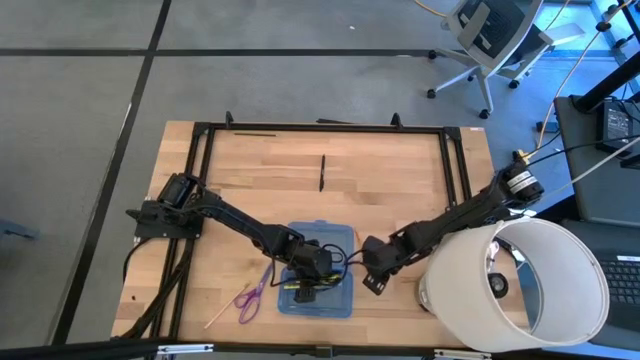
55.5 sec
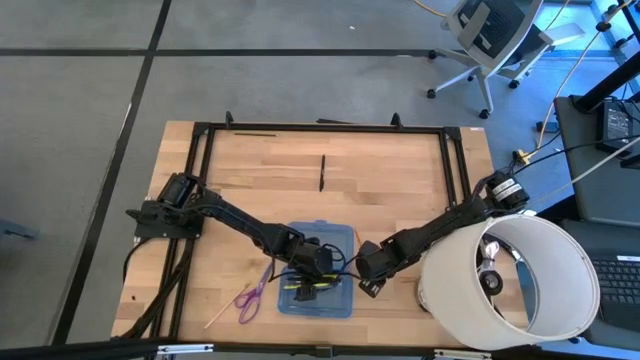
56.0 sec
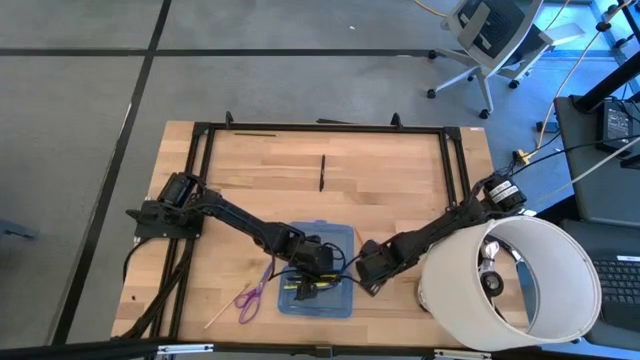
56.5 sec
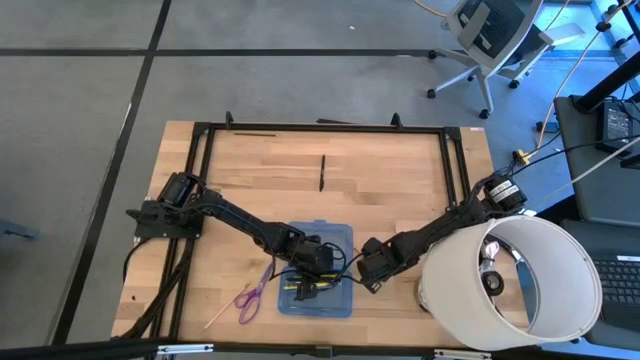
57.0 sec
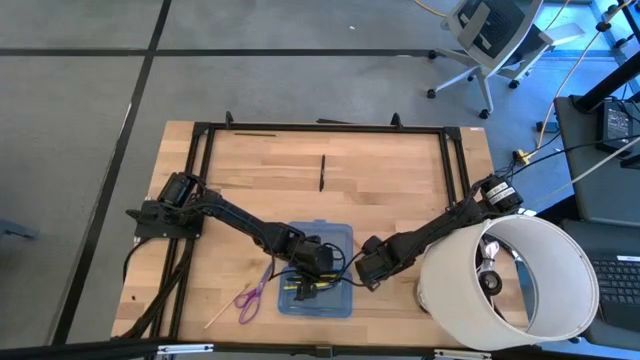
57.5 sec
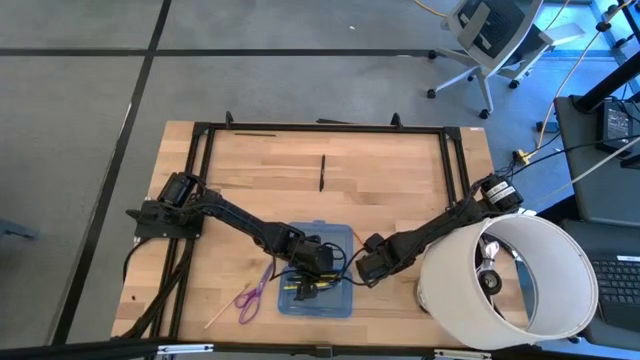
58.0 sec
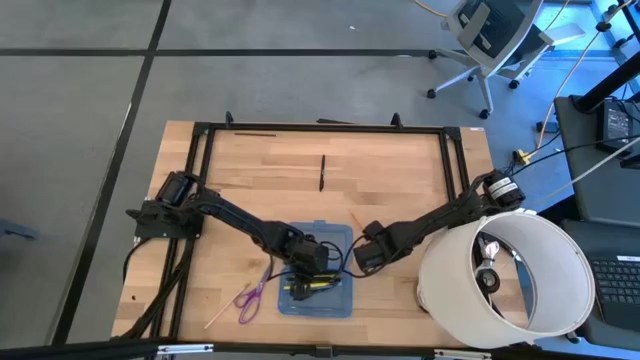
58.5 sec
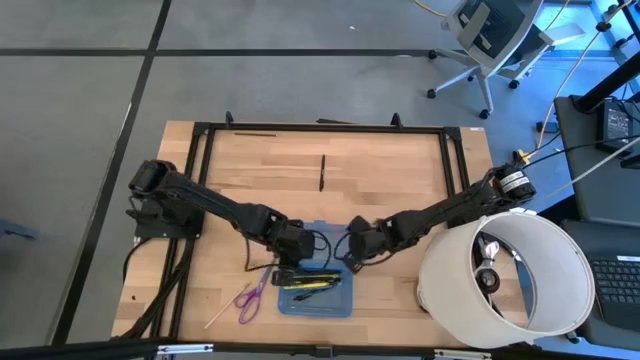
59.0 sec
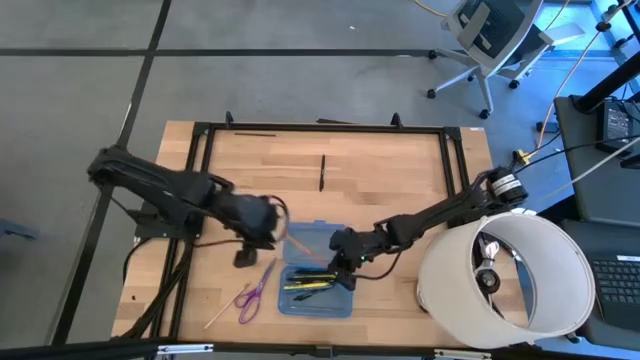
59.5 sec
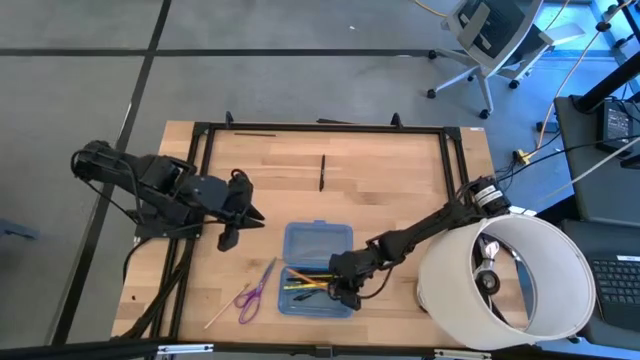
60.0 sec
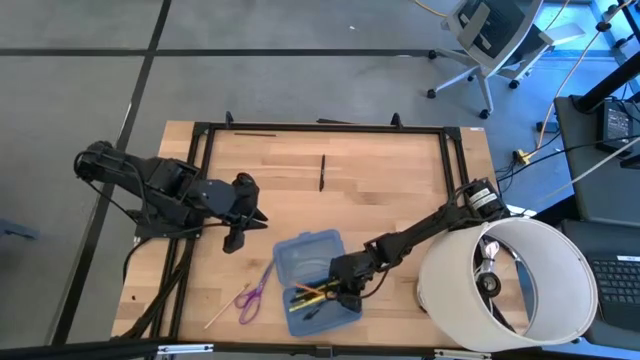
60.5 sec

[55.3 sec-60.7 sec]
Task: Pick & place school supplies into a supply box
Put the orange pencil into the blue supply box

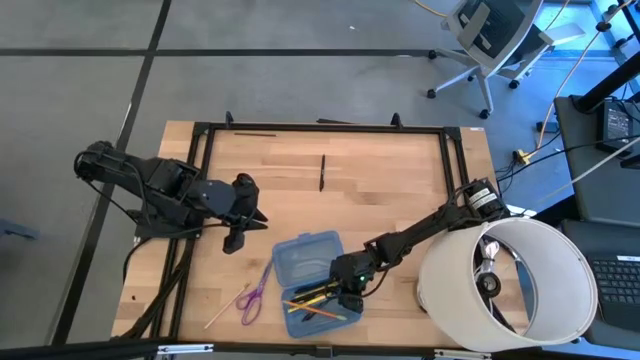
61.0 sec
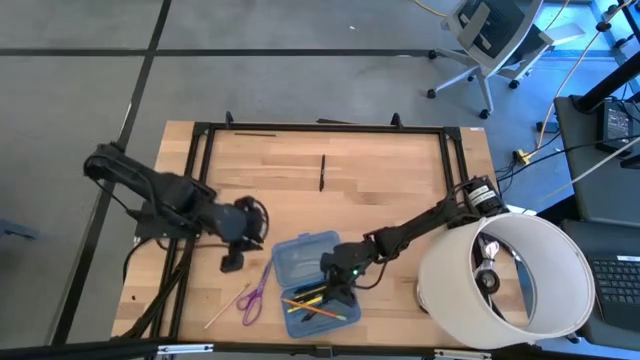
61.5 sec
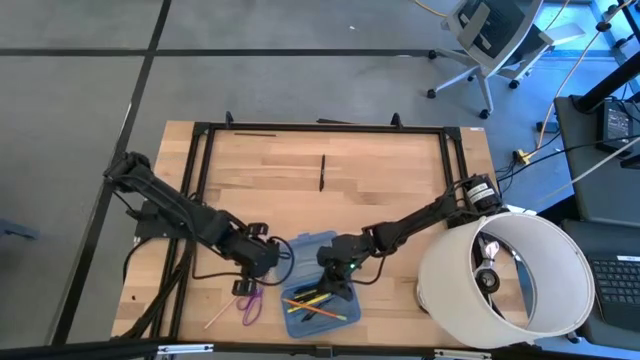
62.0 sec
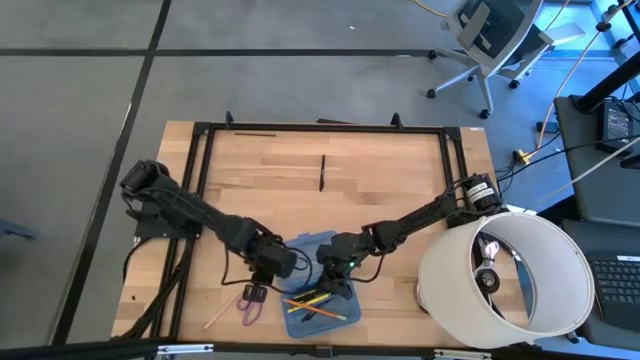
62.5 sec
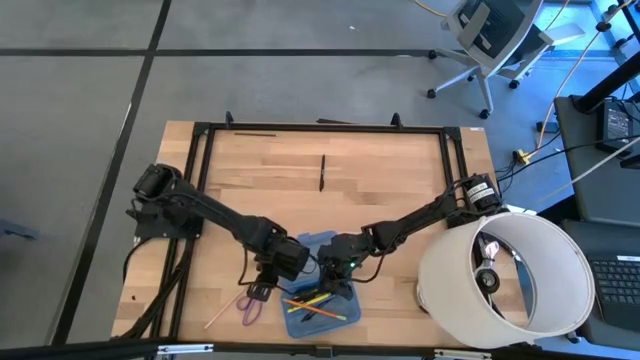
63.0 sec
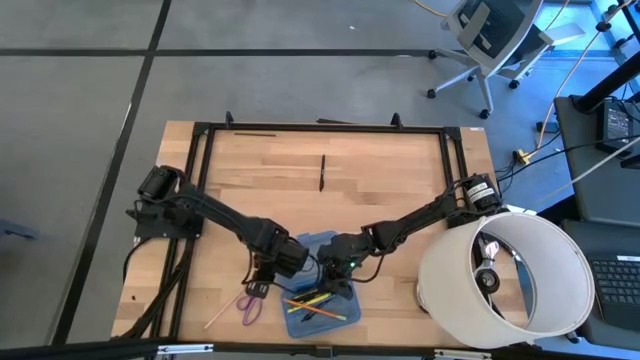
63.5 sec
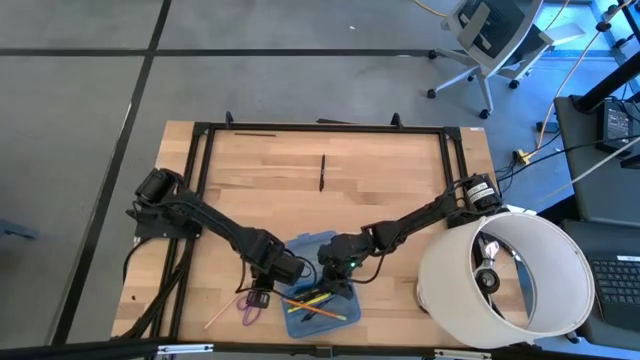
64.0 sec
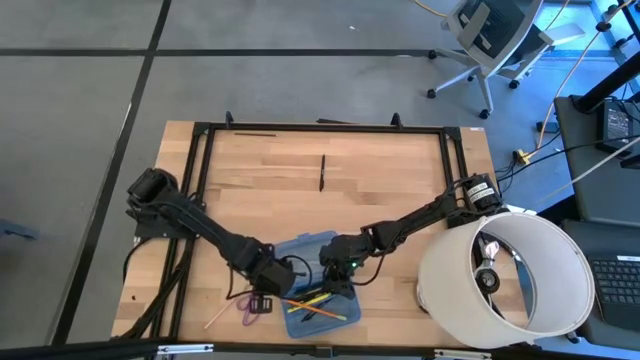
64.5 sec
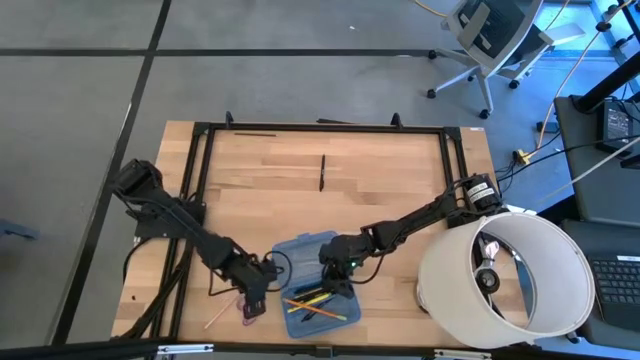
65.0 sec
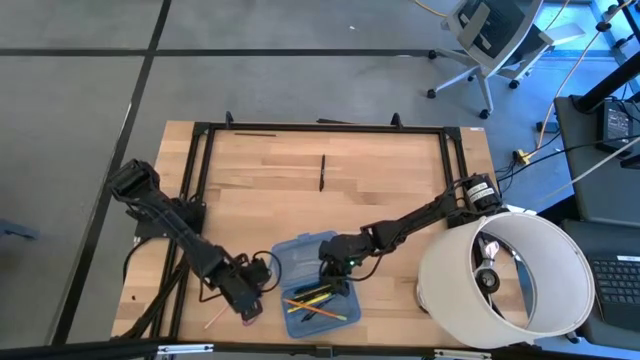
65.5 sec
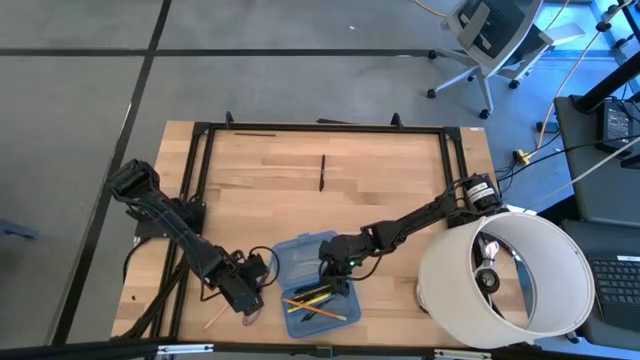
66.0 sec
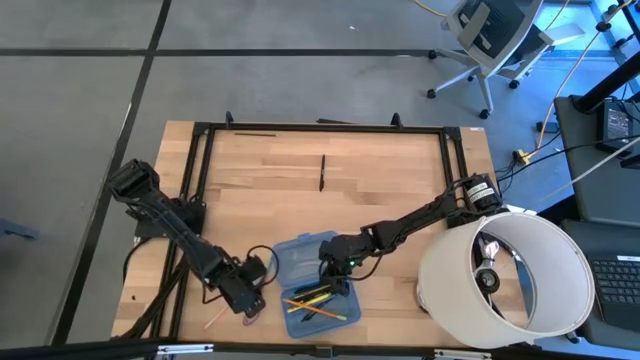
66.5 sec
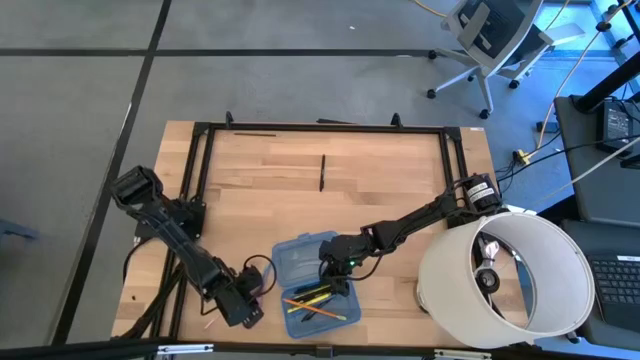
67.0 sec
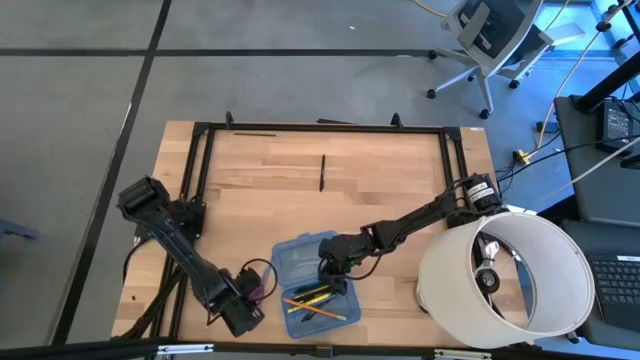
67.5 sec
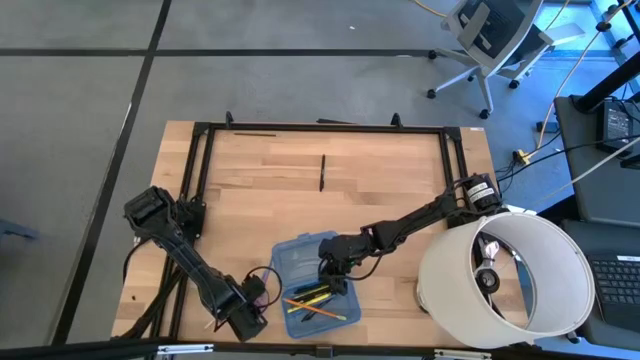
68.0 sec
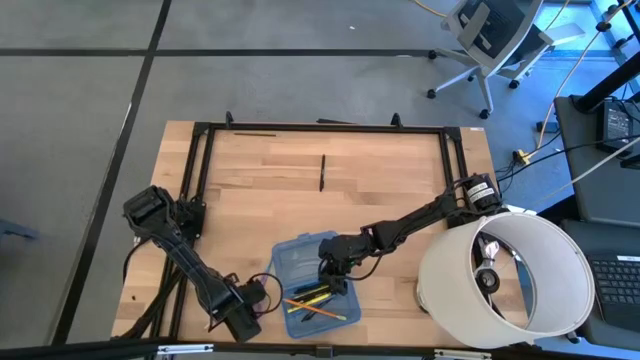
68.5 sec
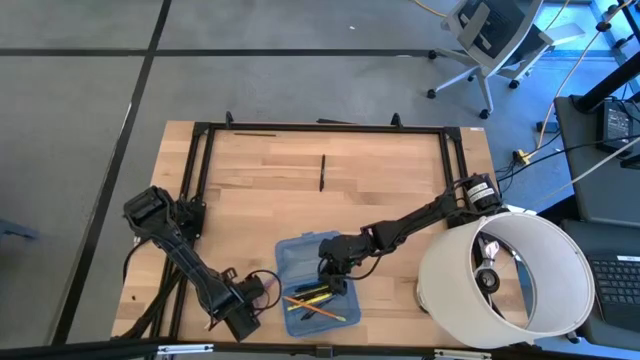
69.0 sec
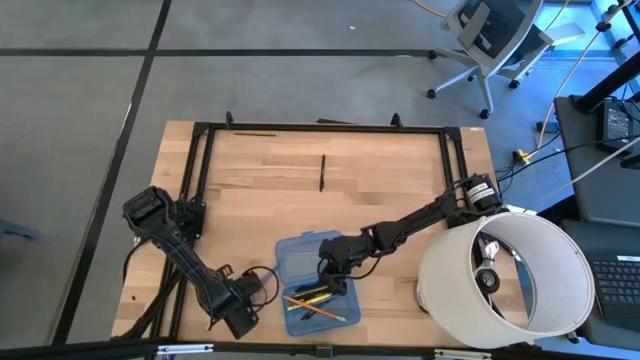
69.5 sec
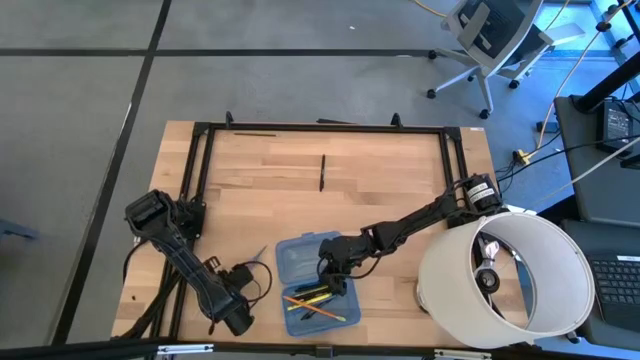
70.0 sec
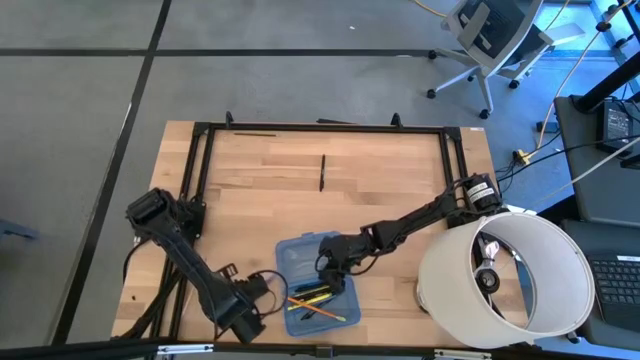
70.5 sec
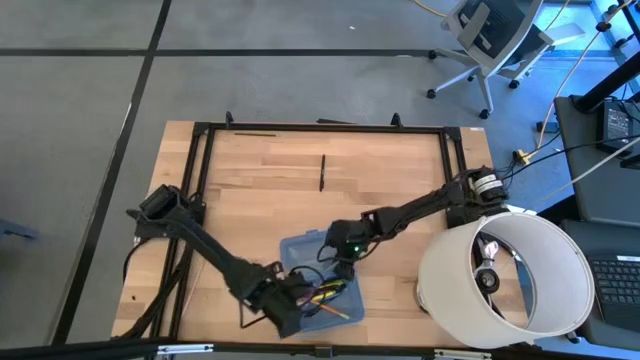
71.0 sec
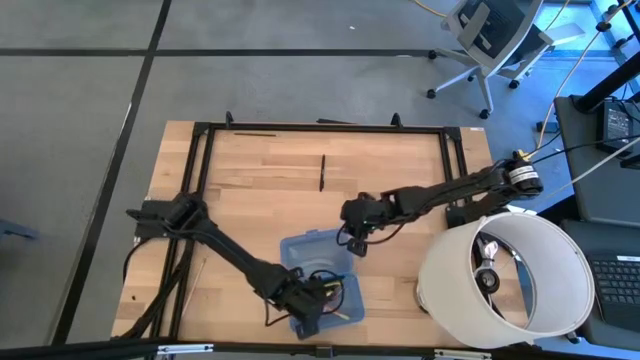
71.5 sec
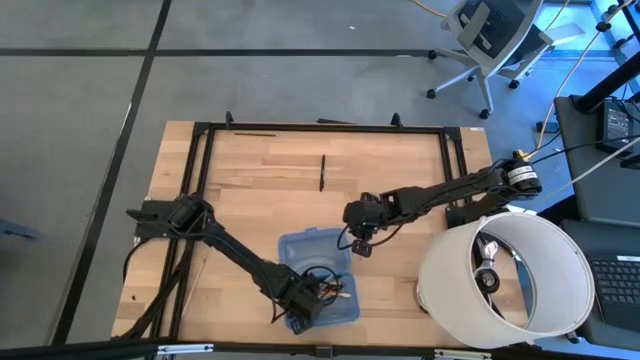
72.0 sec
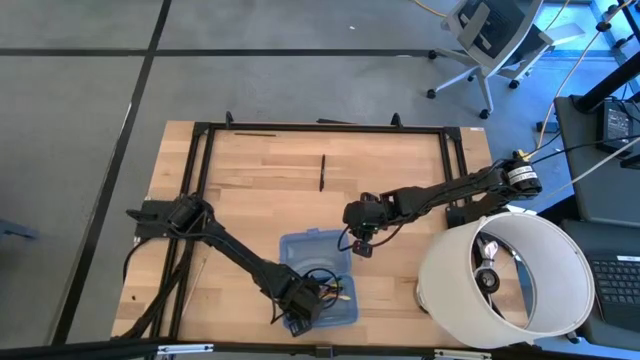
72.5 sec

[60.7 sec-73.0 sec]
Put the violet scissors into the blue supply box

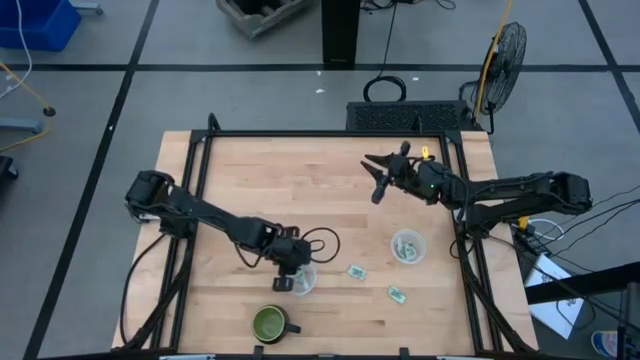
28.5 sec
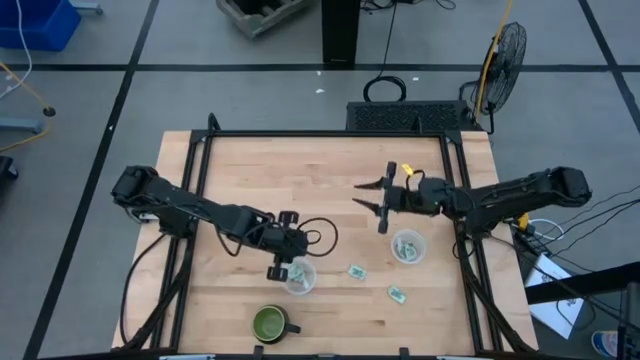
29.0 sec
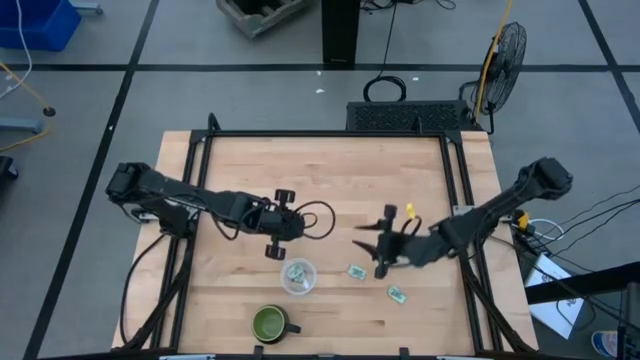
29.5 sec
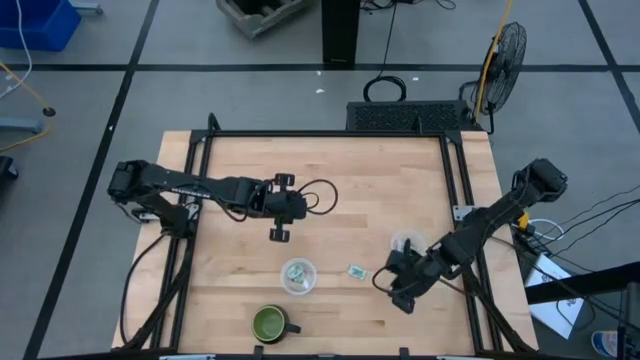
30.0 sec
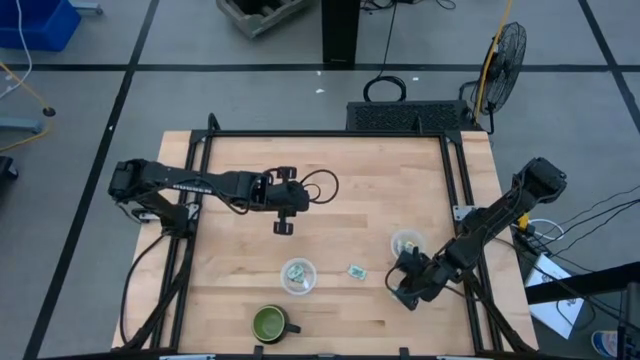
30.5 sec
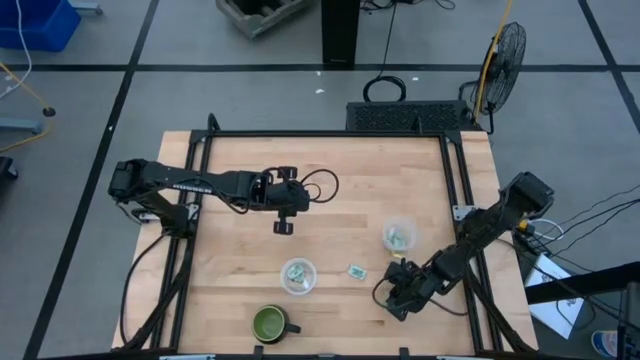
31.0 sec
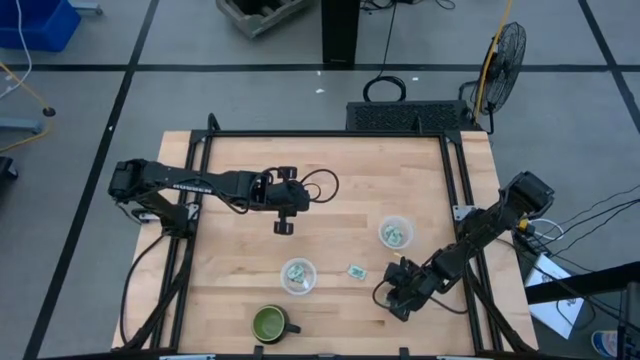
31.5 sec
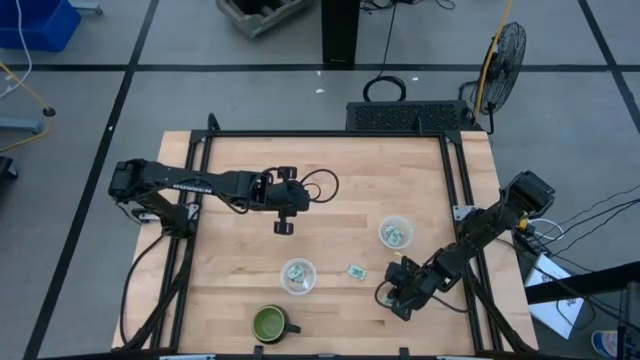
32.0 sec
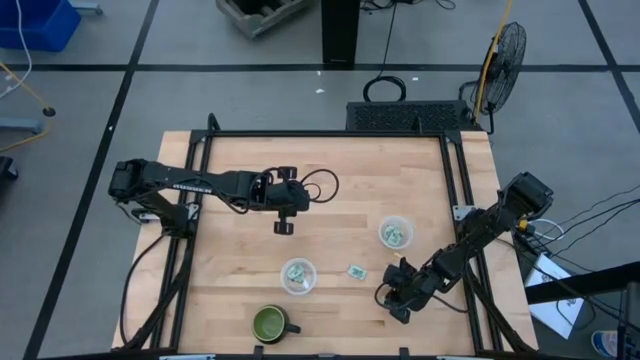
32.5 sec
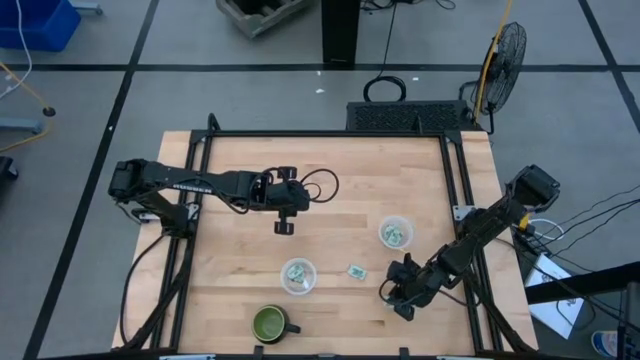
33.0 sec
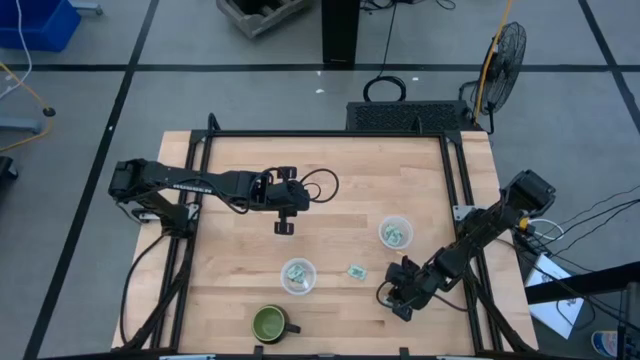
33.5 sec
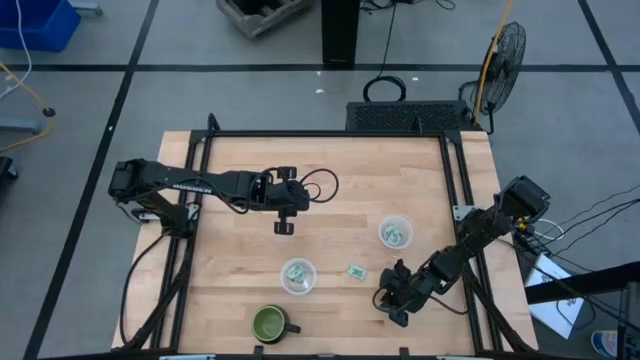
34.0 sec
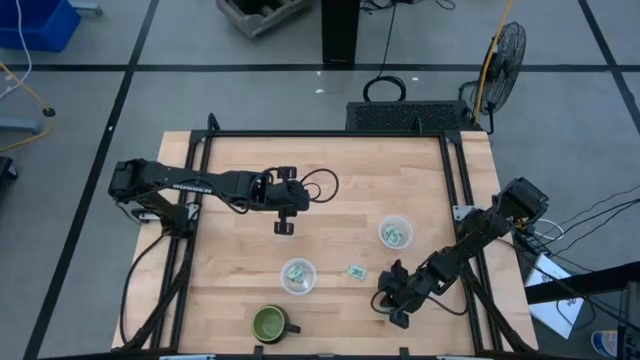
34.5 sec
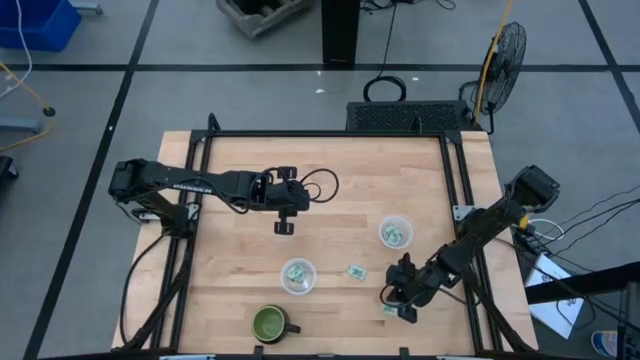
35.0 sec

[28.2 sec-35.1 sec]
Task: Pick and place Stevia / Truvia into bins
Put the white stevia packet into the right transparent container
